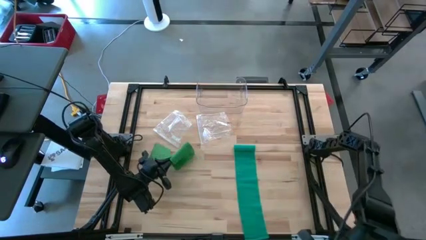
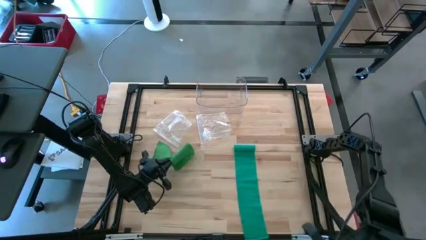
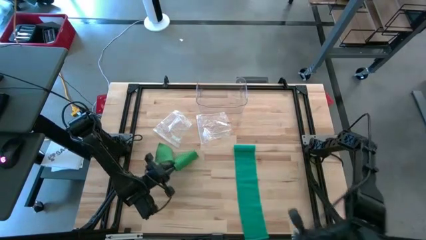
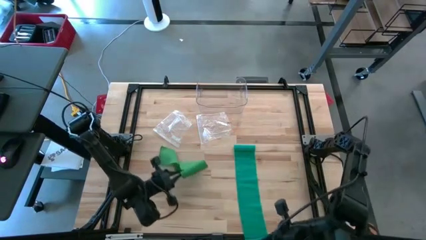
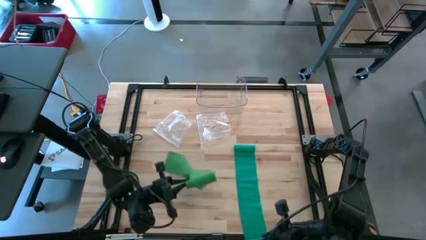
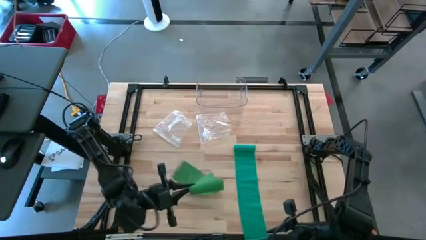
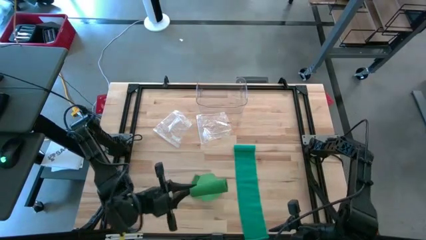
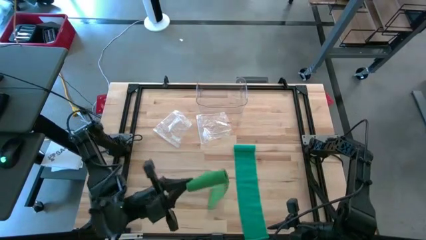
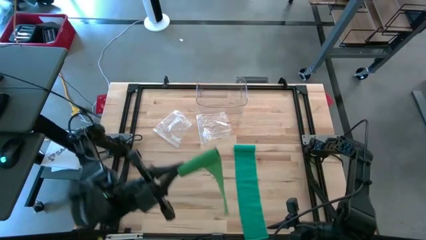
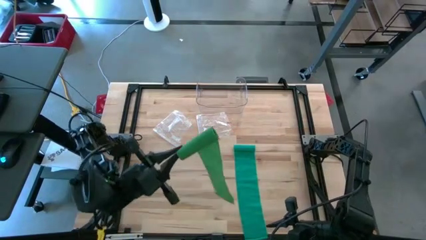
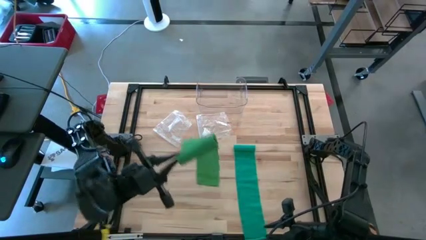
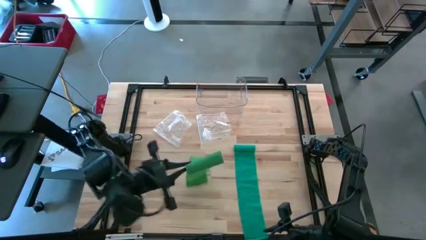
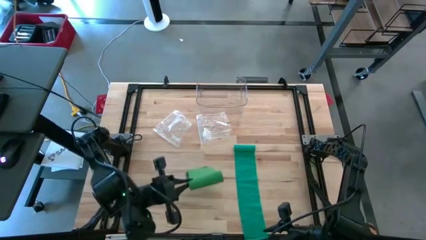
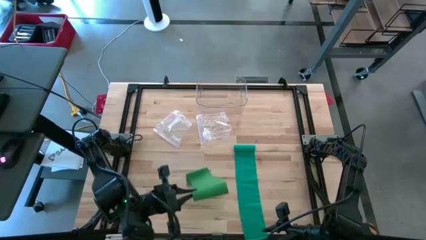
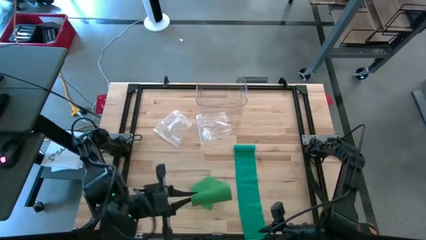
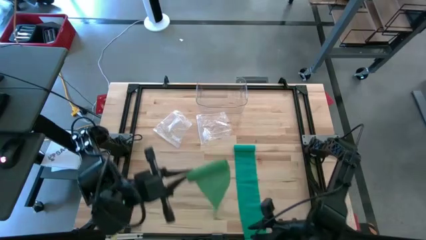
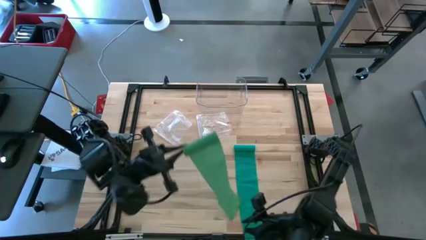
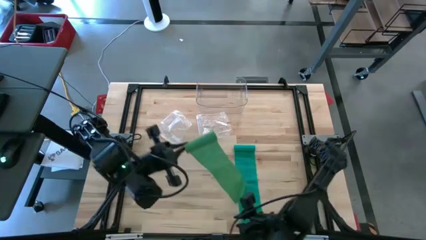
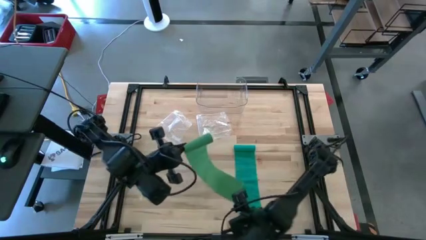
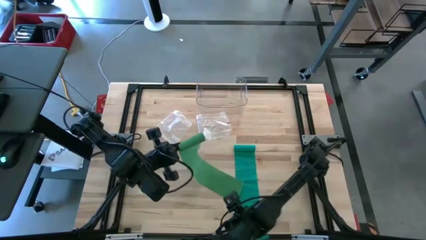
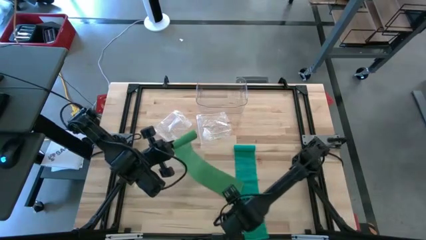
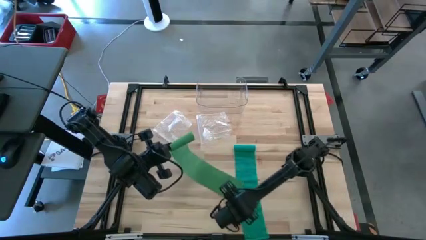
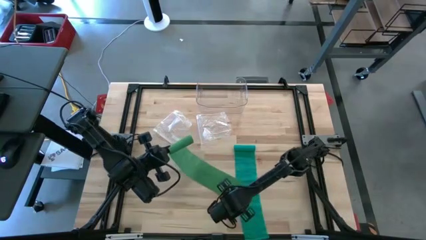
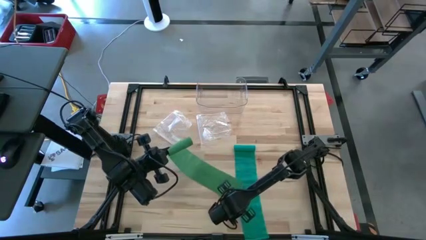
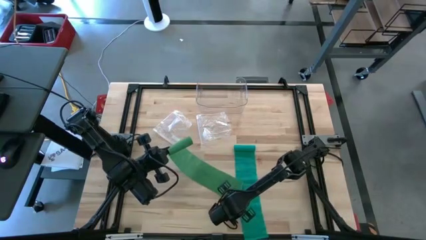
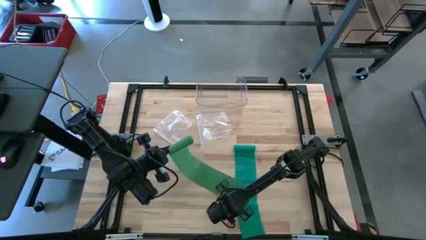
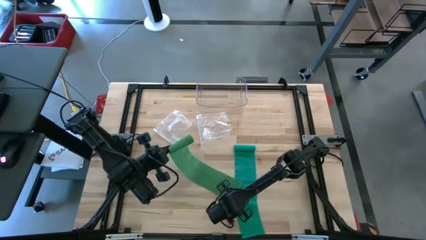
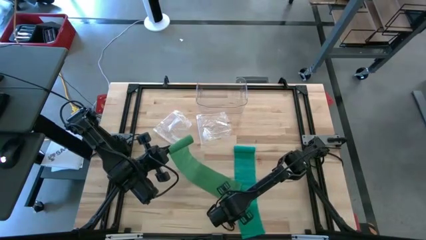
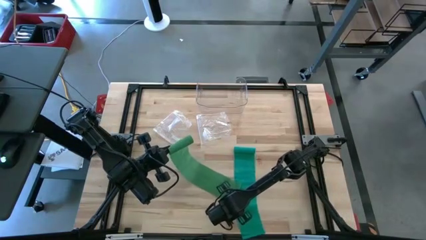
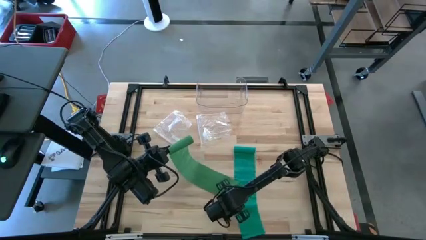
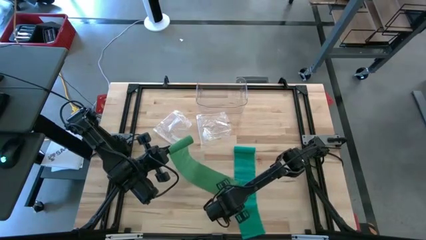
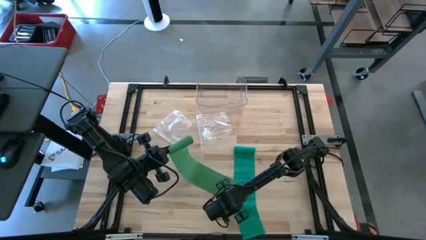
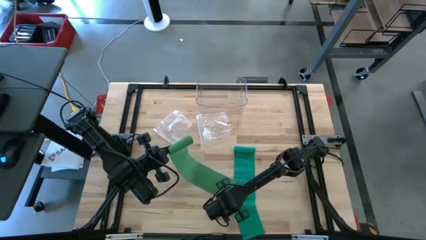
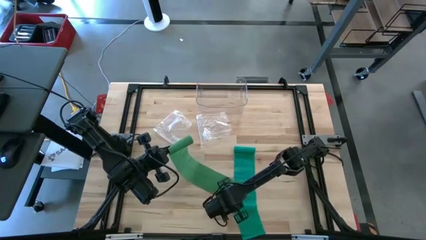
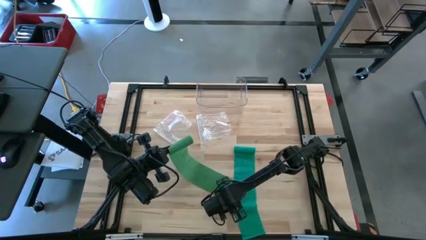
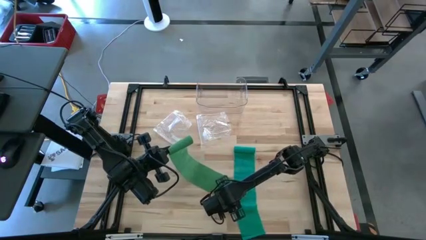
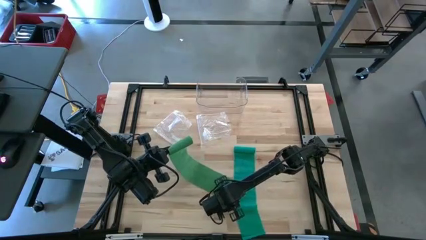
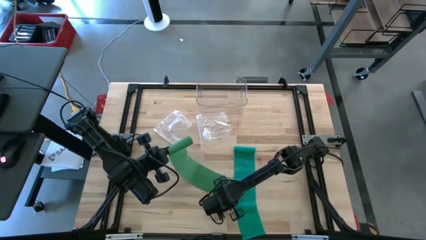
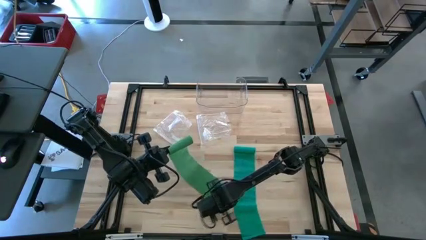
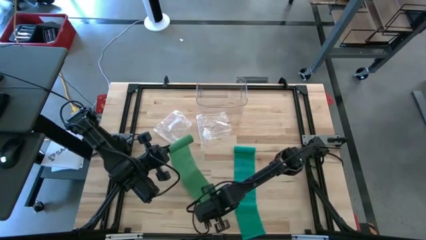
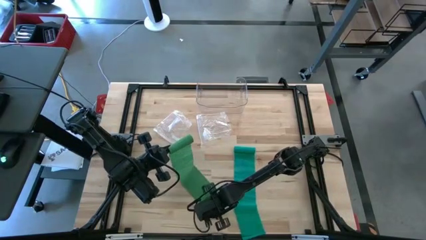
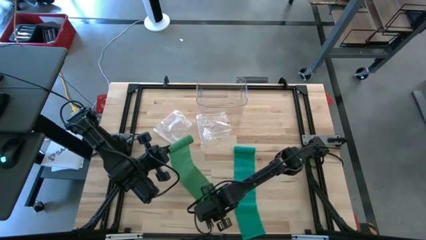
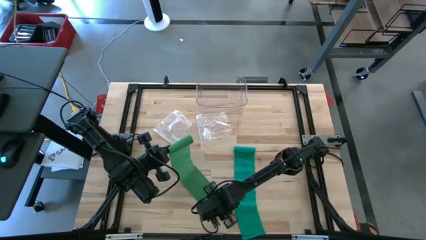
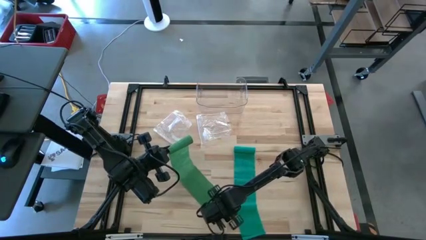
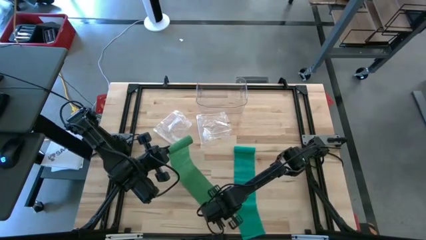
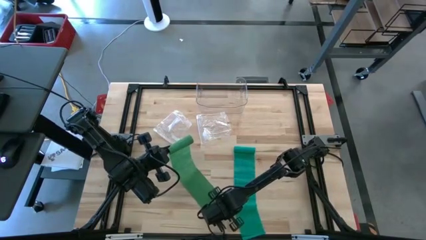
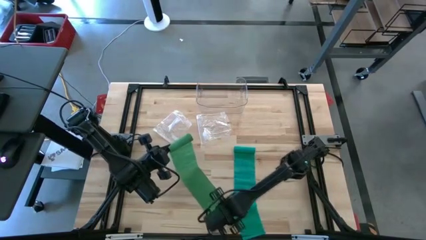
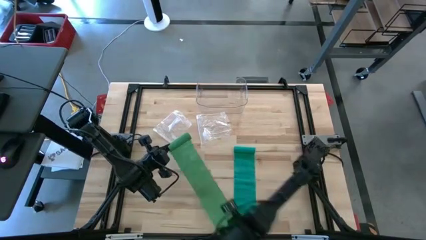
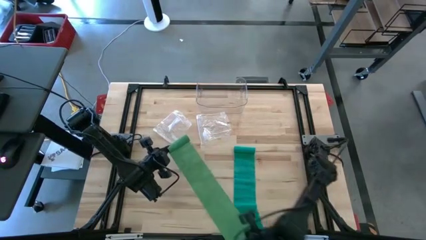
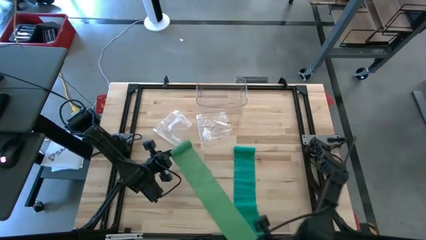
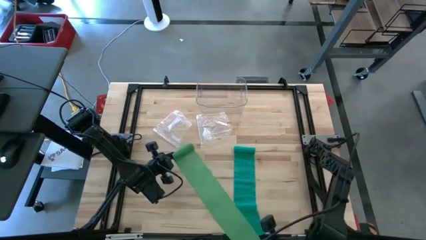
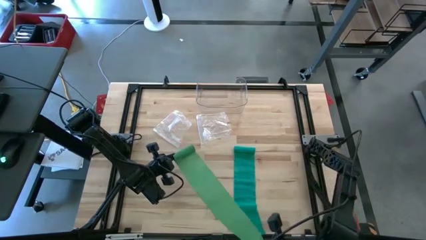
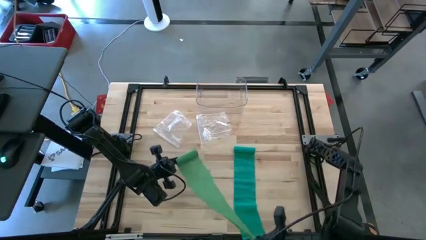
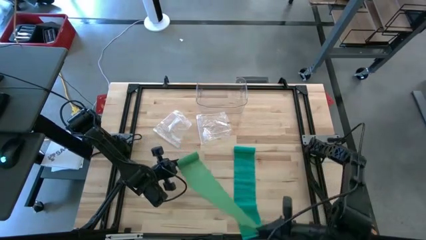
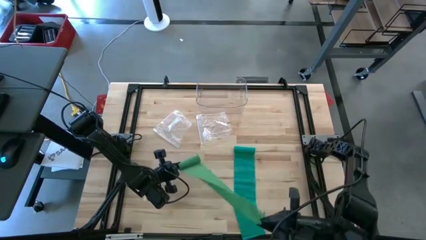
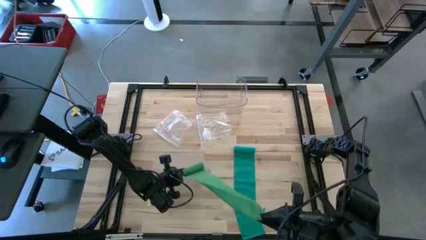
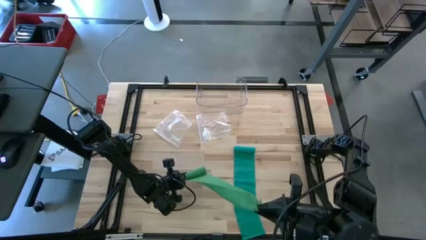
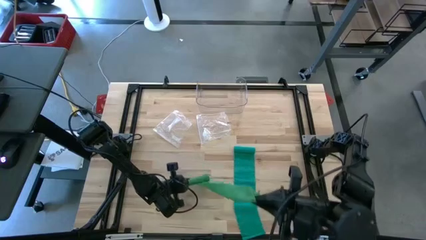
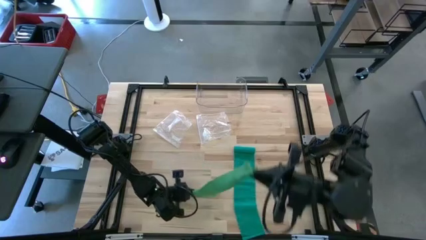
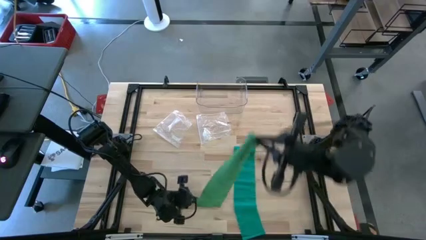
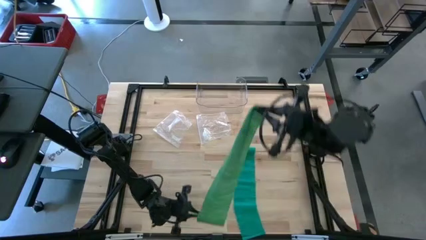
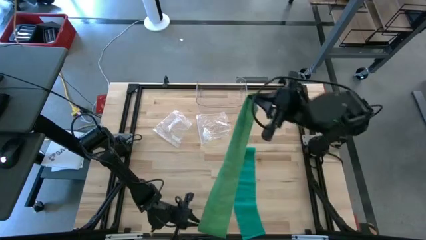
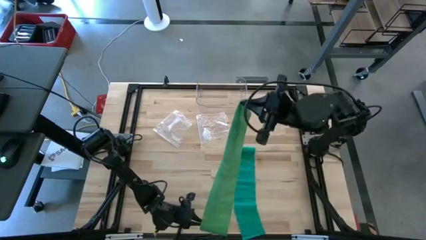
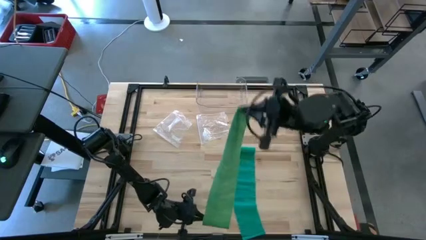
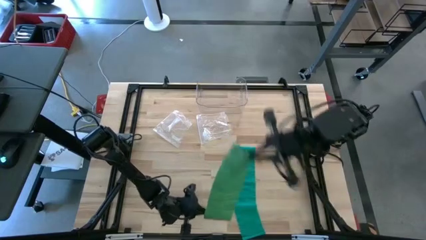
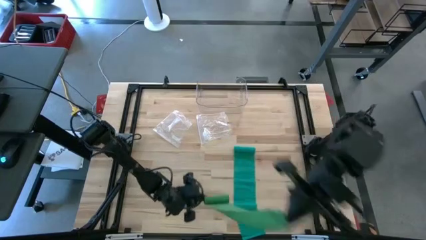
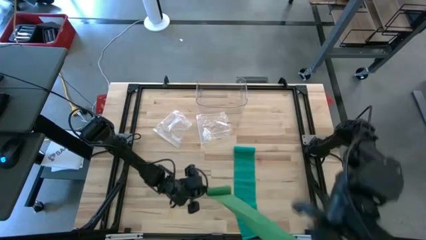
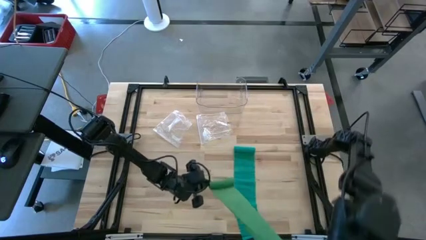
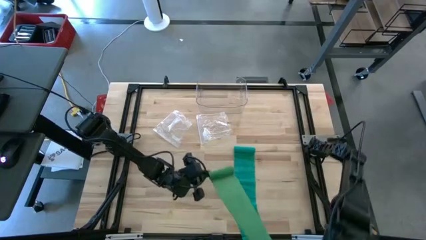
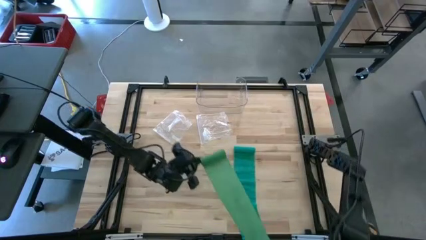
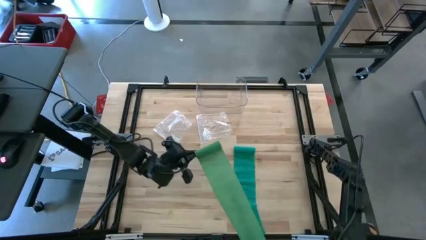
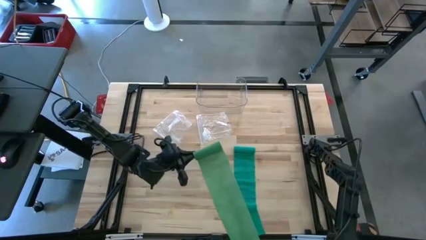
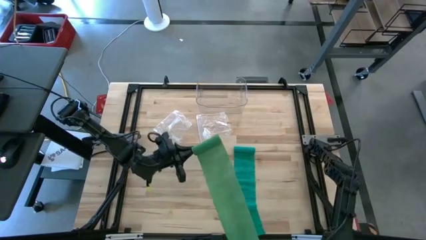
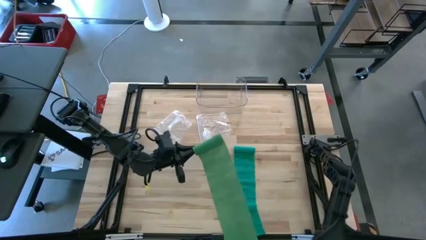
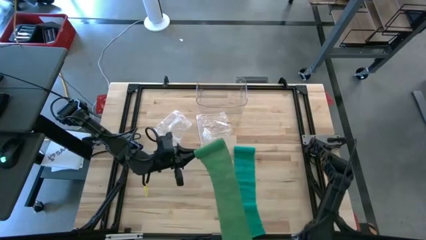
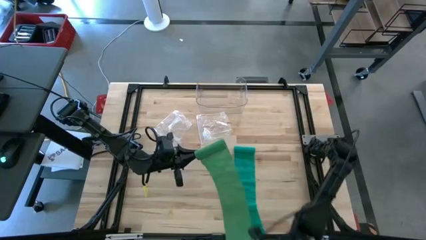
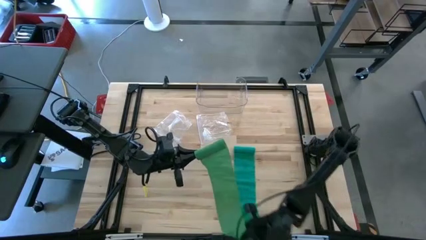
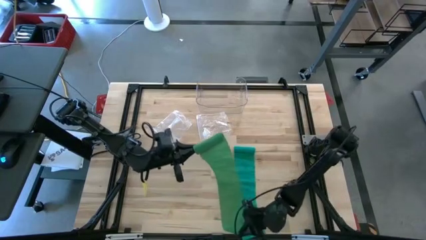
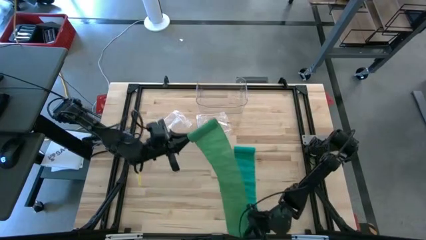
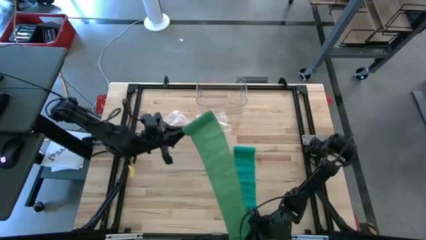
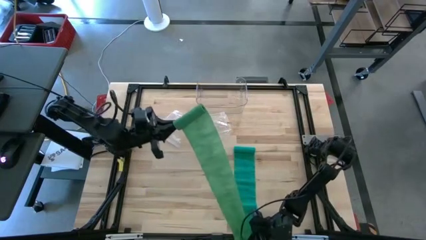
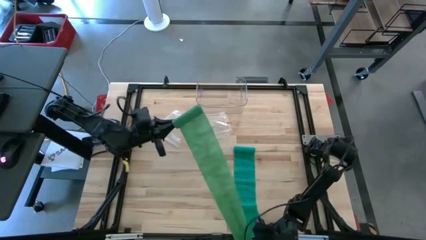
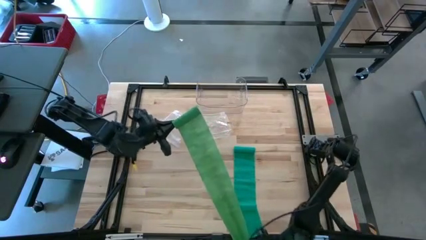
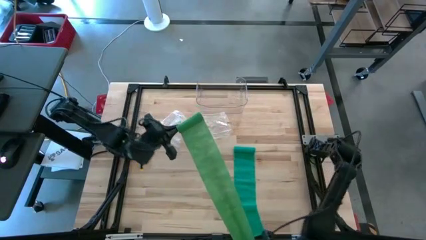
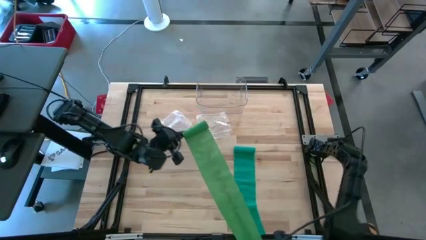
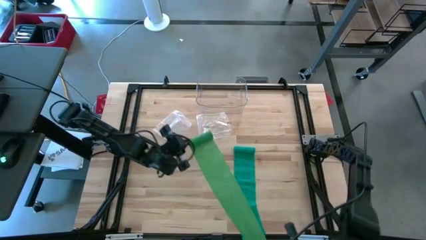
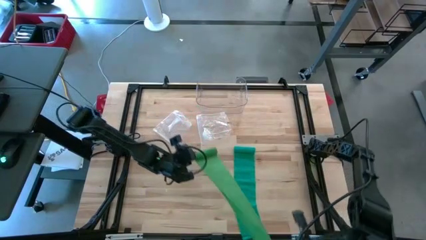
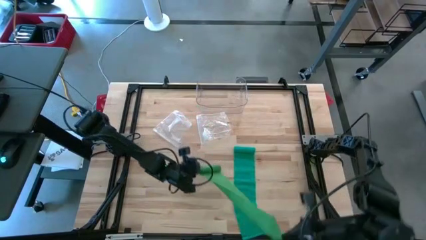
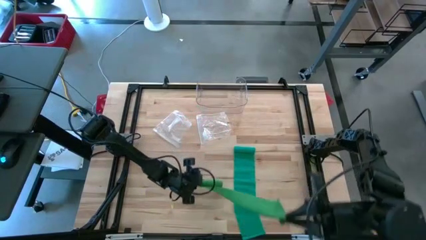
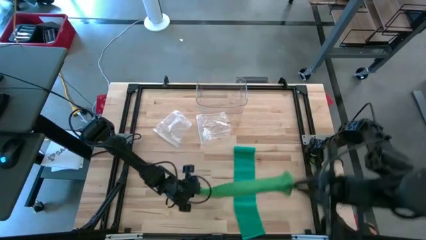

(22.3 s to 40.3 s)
Task: Roll bandage
Roll the green bandage
